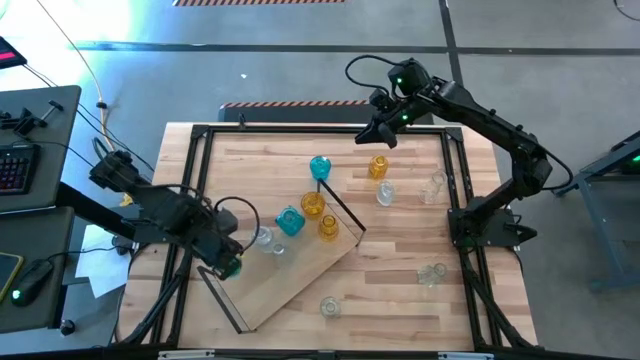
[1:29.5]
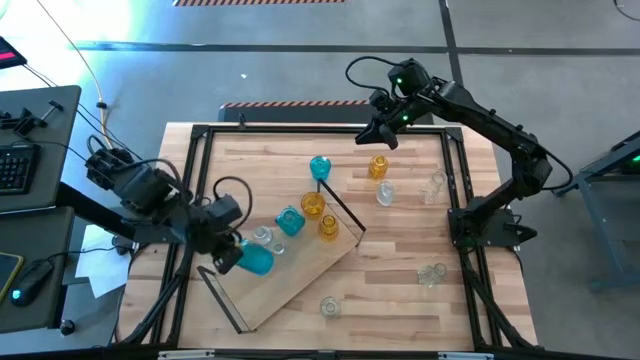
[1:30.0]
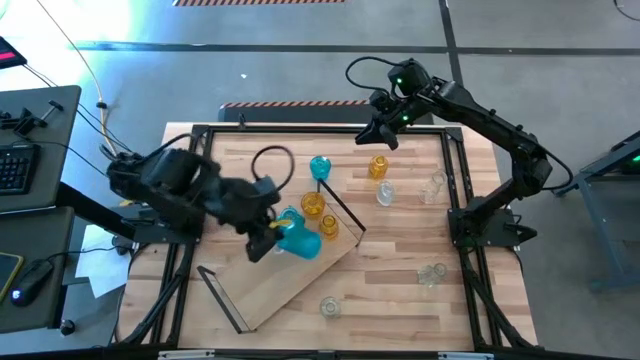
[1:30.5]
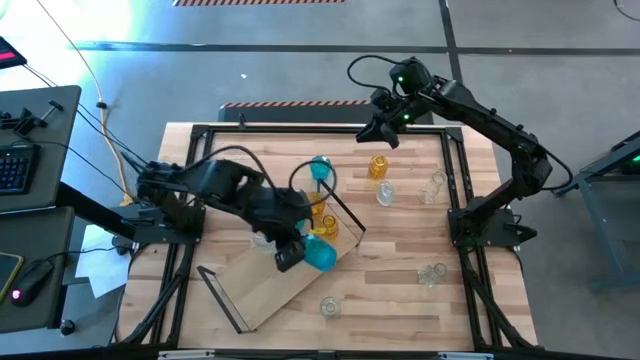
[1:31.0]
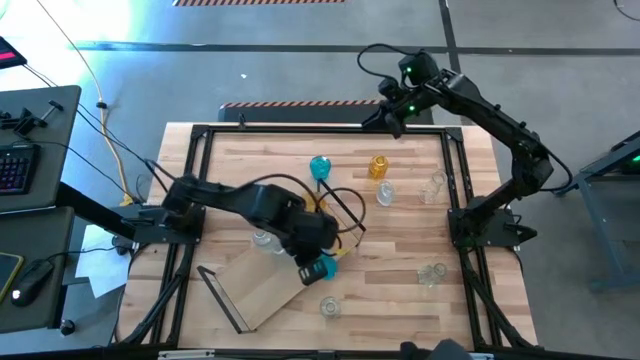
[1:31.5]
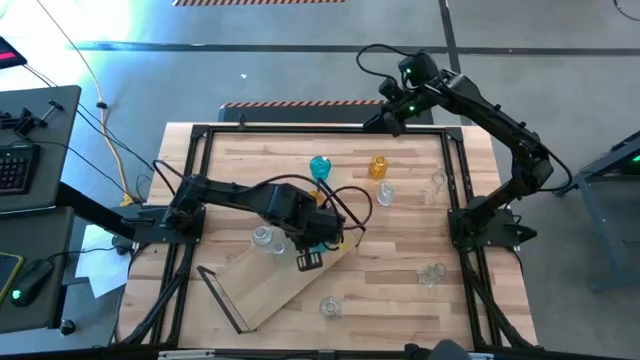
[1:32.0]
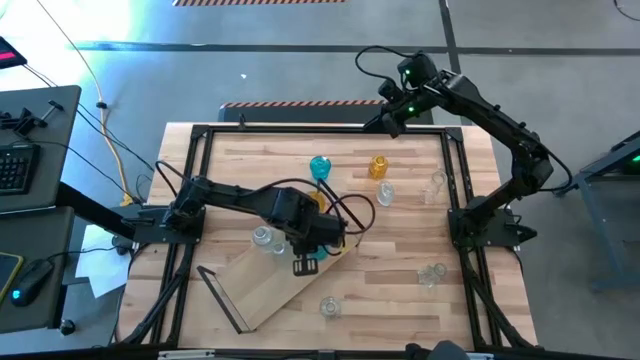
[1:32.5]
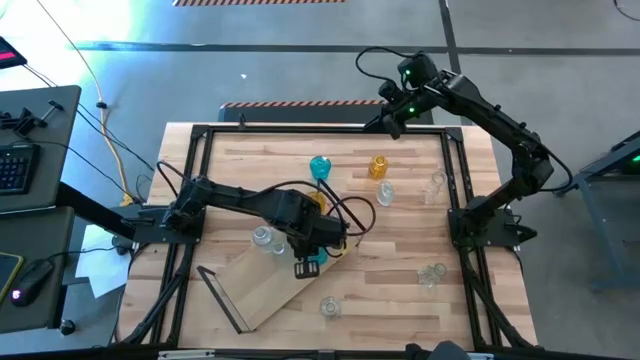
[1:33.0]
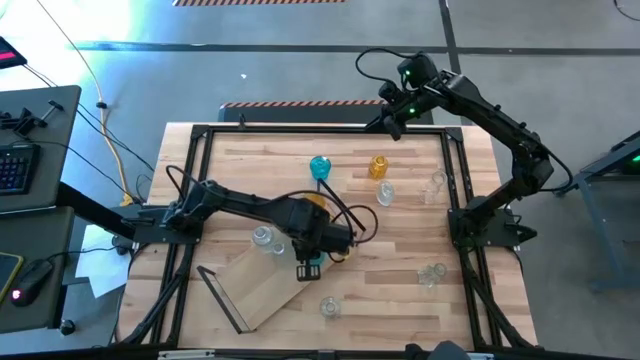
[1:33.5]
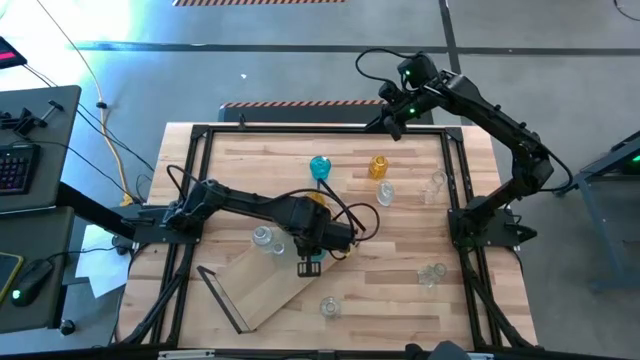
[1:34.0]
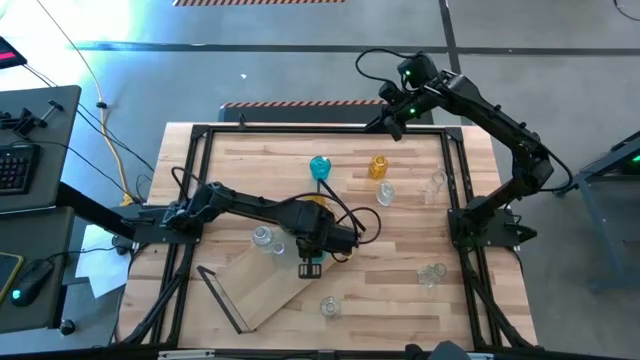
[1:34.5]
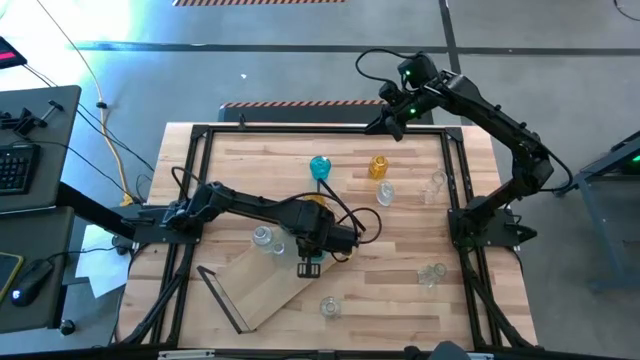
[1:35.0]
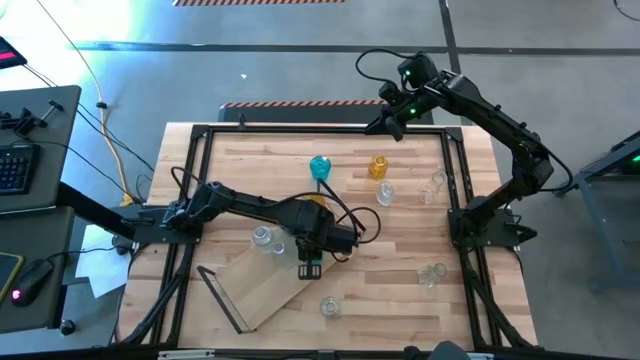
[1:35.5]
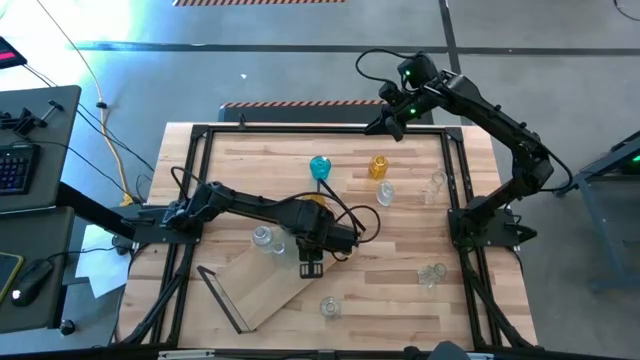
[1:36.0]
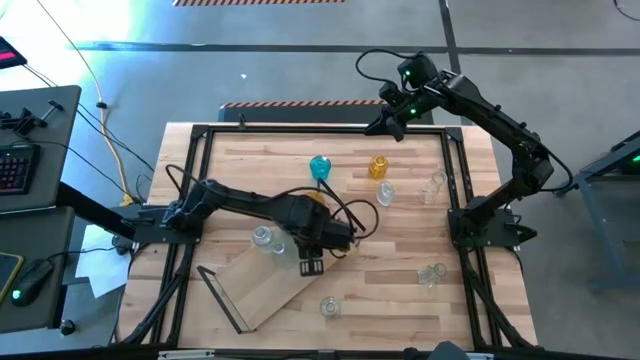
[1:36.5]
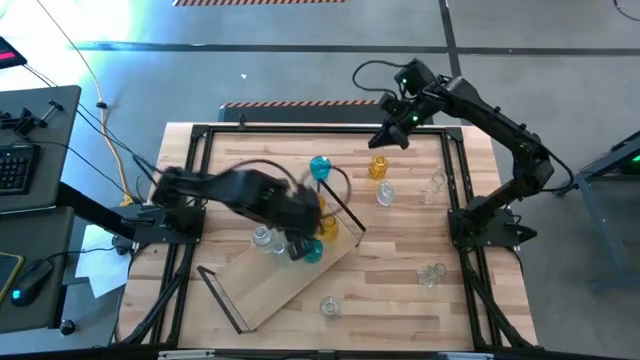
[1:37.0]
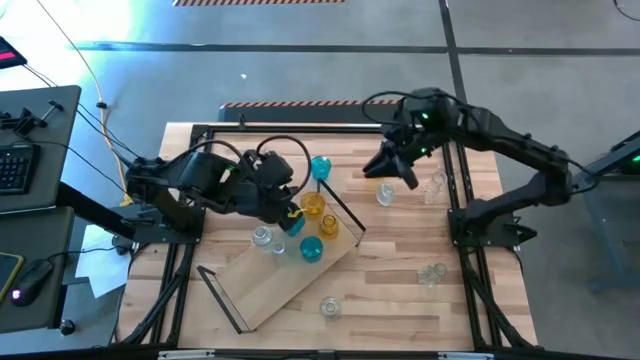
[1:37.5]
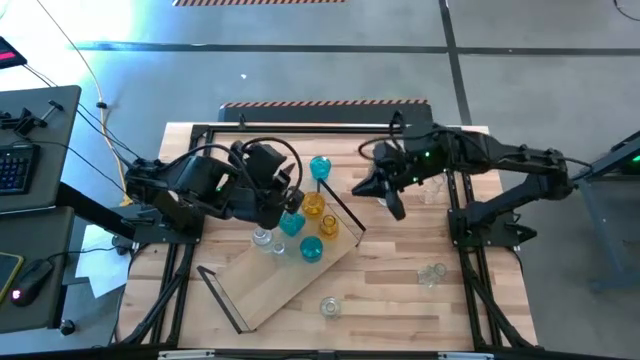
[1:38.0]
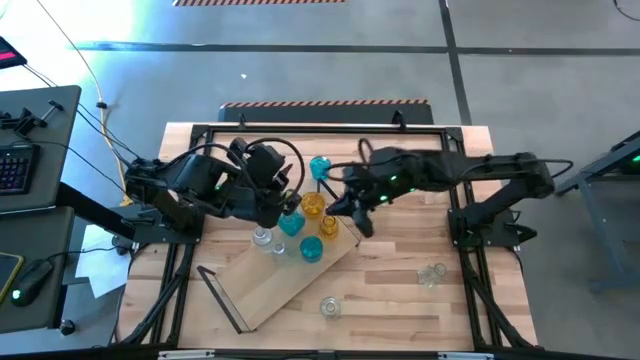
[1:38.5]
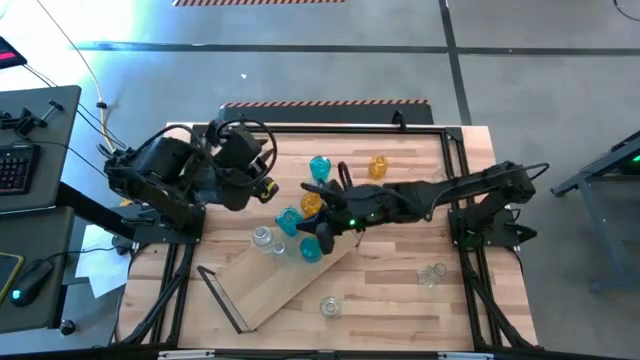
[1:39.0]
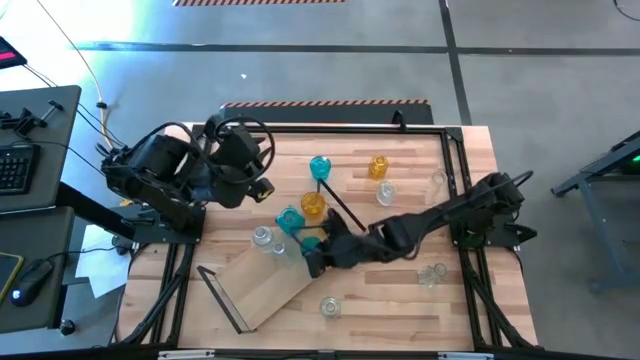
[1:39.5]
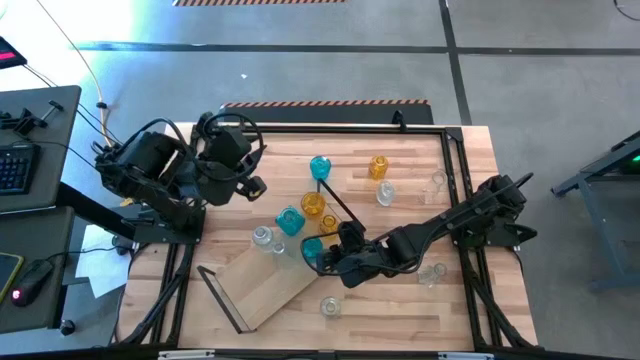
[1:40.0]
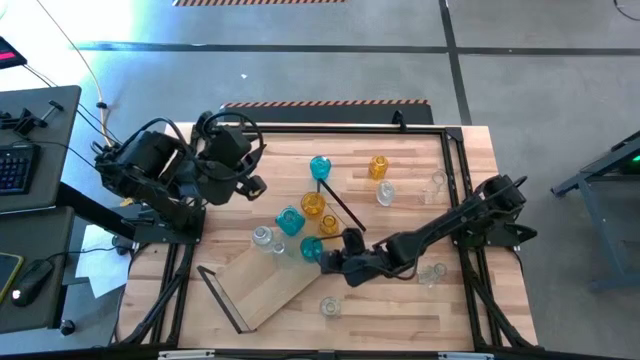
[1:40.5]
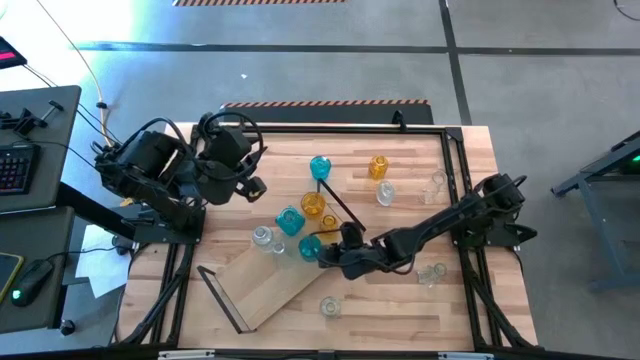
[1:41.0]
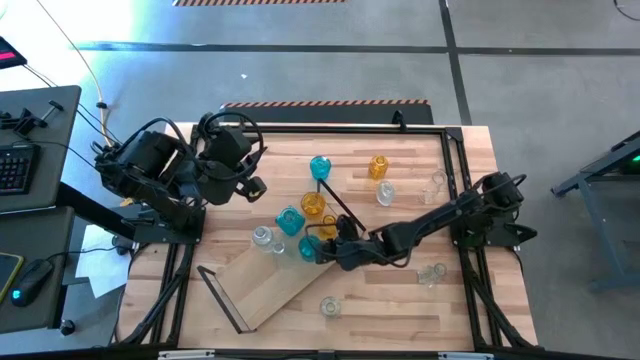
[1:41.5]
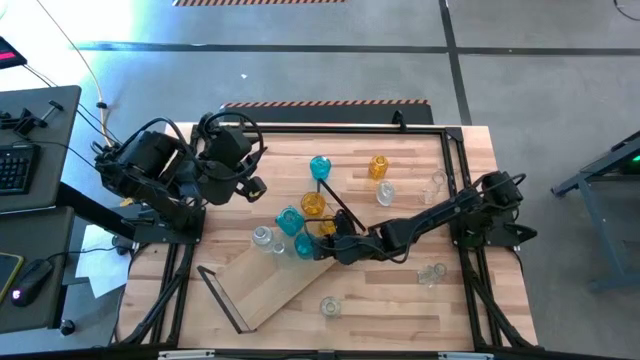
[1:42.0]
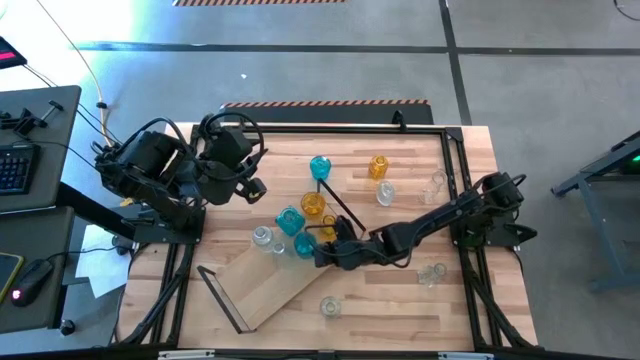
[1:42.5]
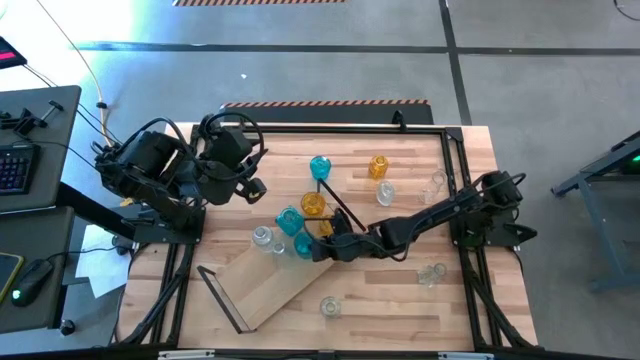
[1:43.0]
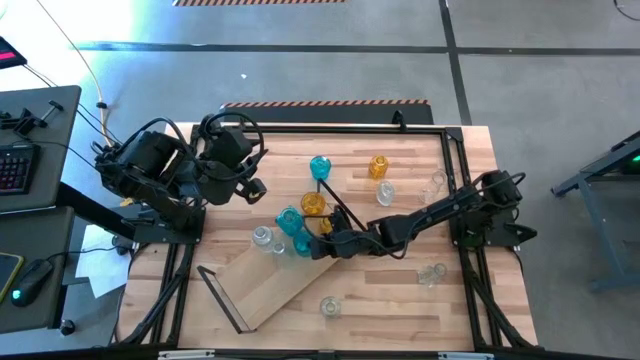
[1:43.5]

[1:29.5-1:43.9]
Task: sort vases onto shelf
Put the blue vase on the shelf aligned with the other blue vase

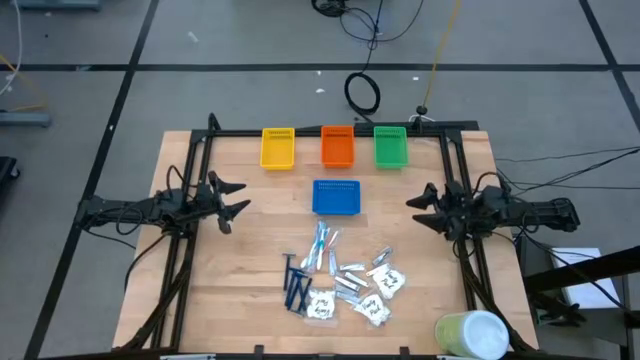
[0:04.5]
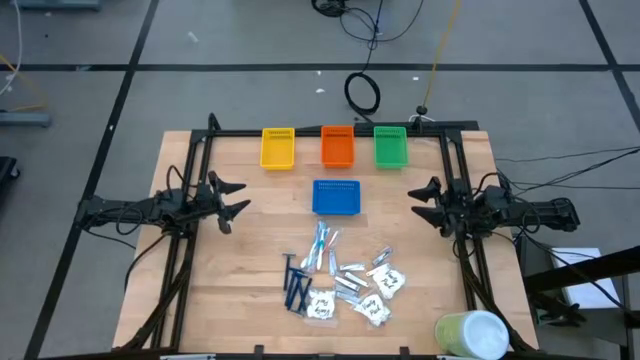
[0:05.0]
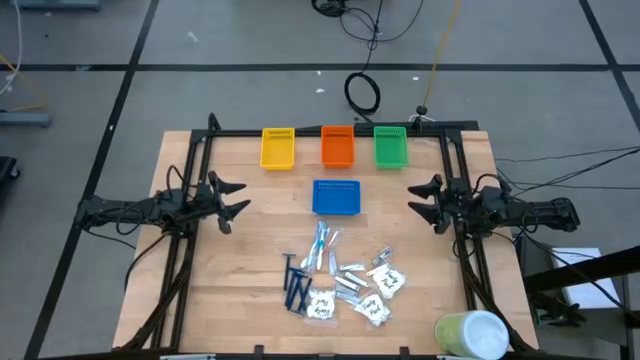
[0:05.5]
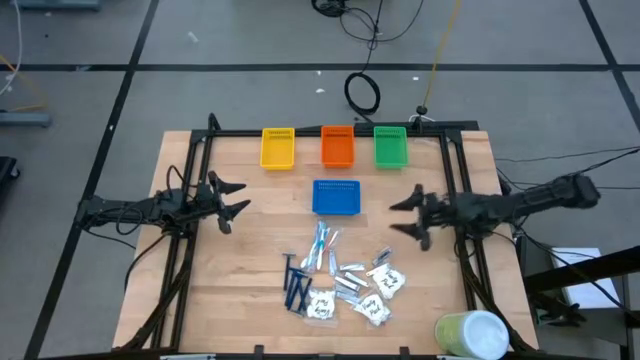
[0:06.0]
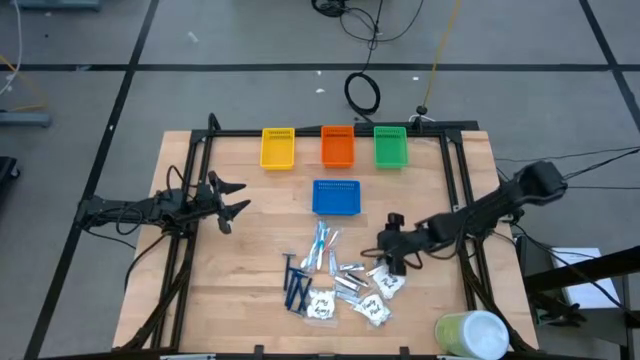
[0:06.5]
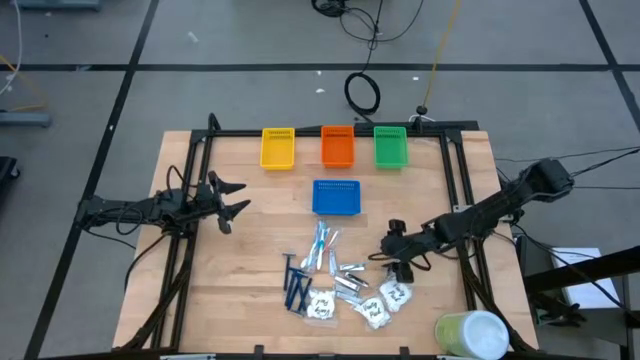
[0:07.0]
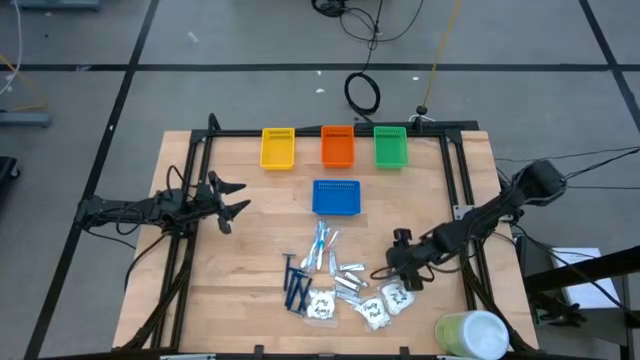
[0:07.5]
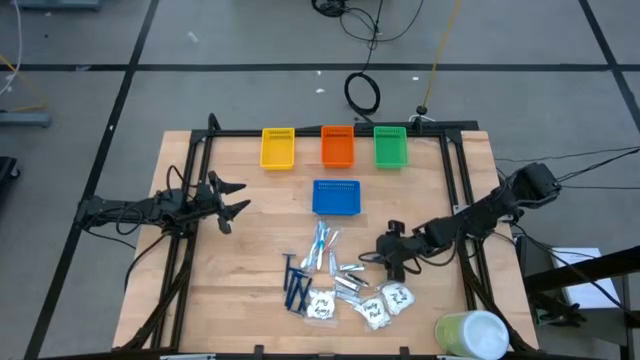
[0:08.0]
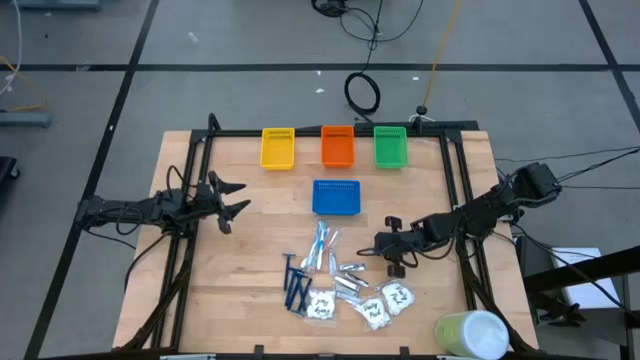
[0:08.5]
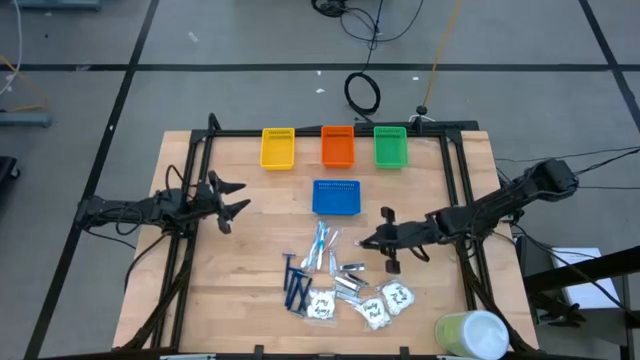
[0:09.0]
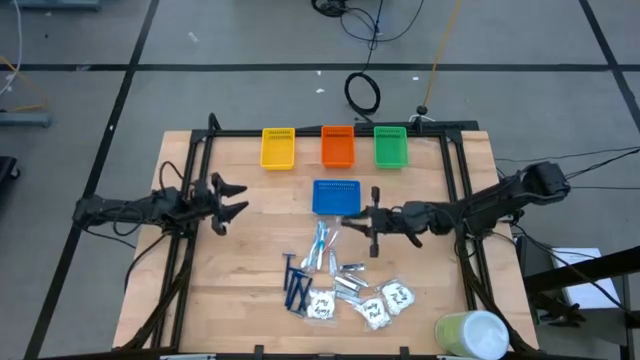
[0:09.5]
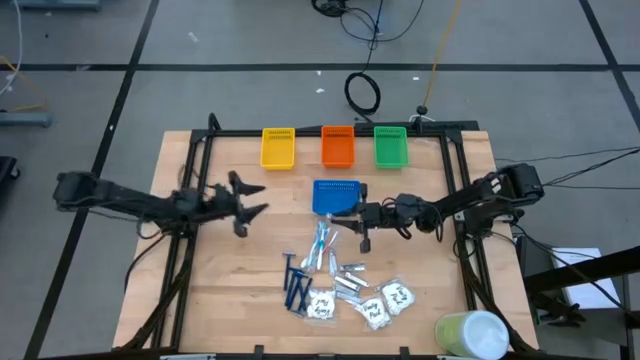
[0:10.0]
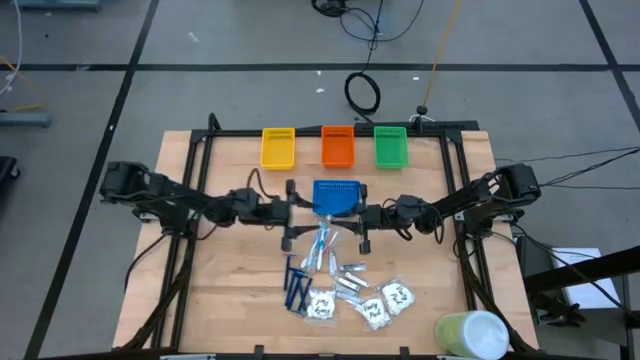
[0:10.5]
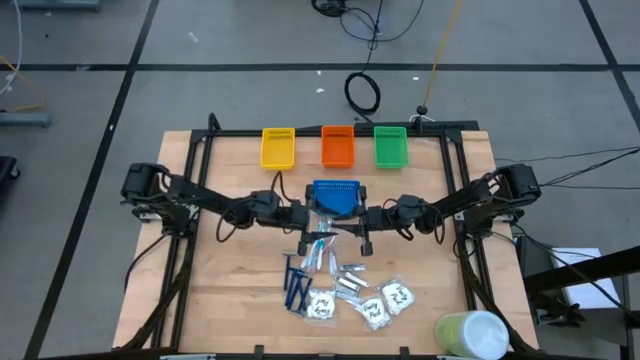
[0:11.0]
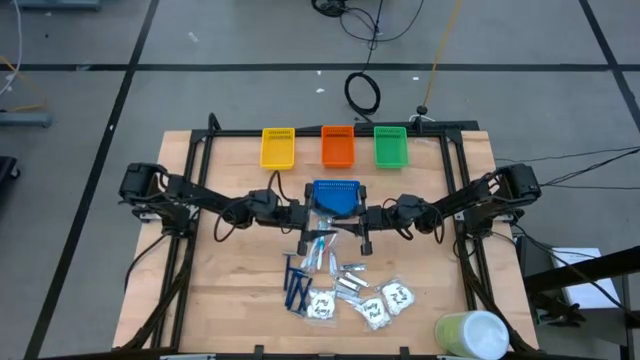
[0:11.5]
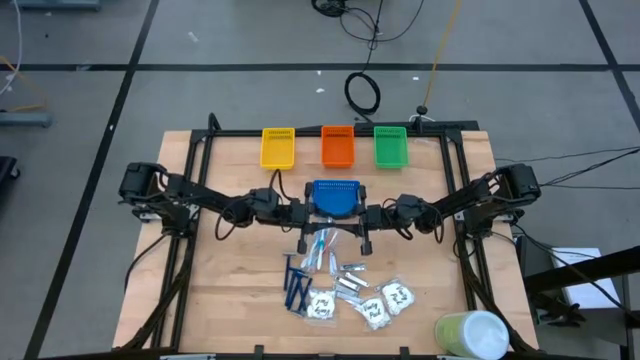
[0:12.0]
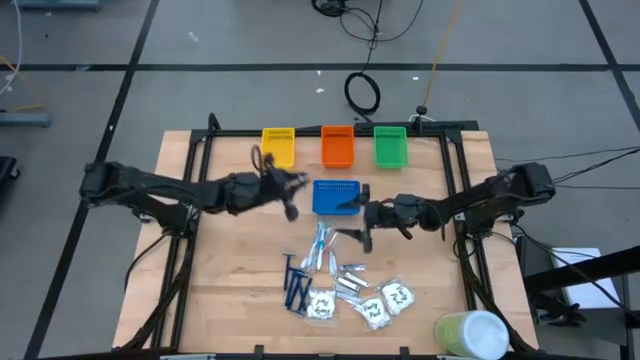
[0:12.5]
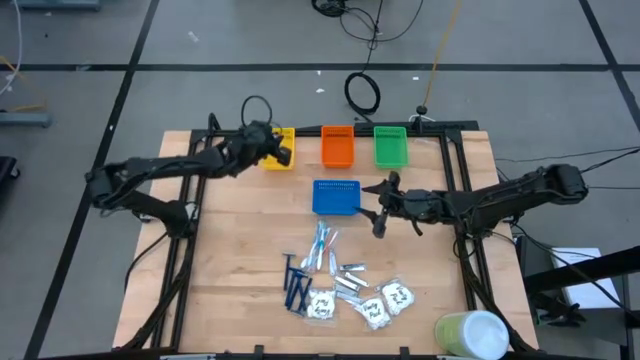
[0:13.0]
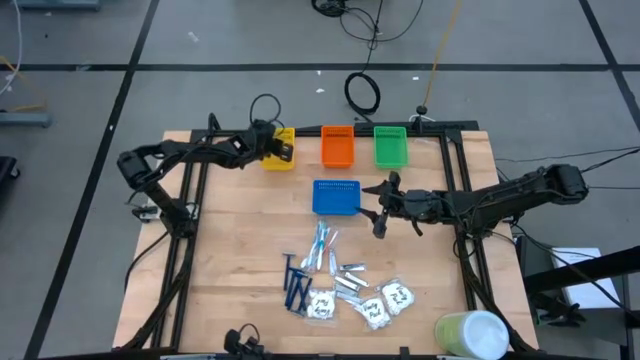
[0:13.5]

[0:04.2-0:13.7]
Task: Pick & Place Travel size toiletries
Put the silver nail cutter into the yellow basket
